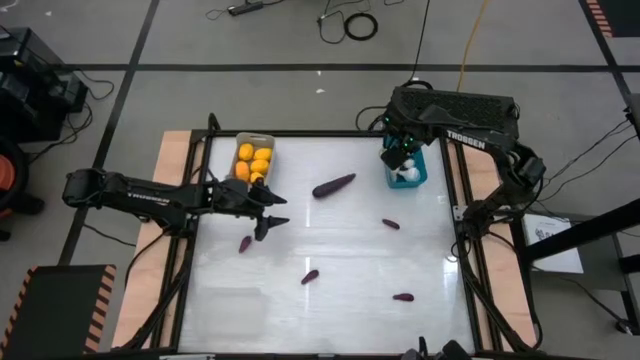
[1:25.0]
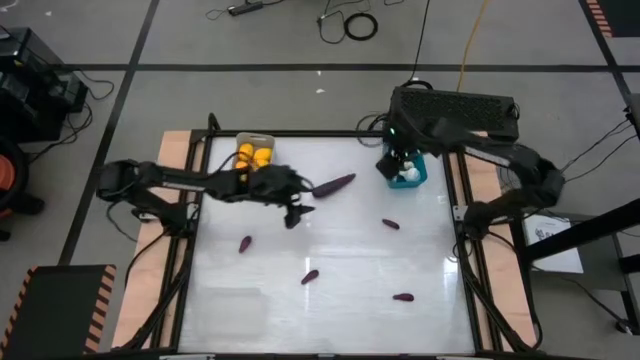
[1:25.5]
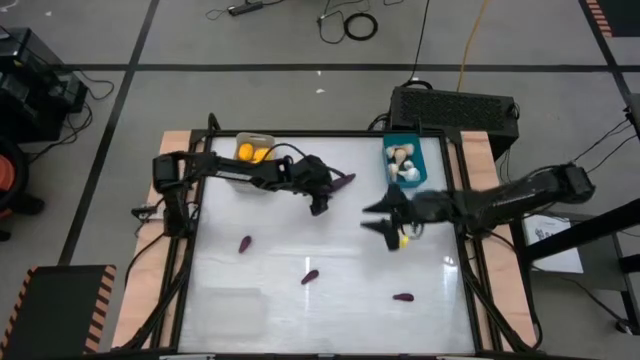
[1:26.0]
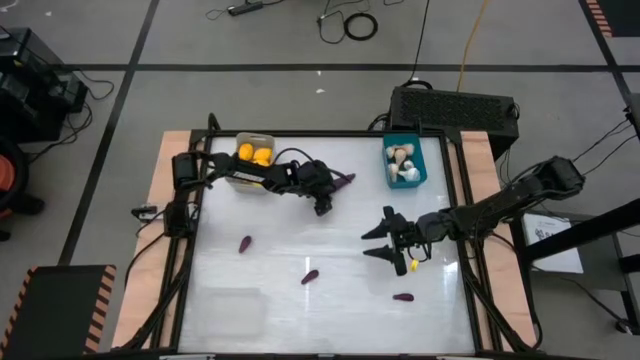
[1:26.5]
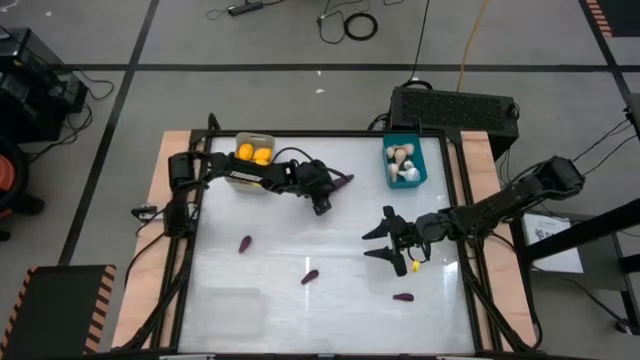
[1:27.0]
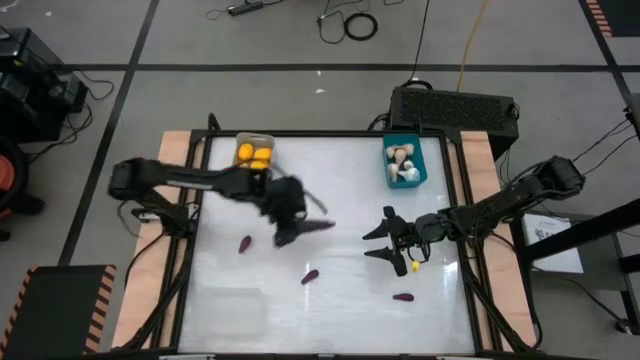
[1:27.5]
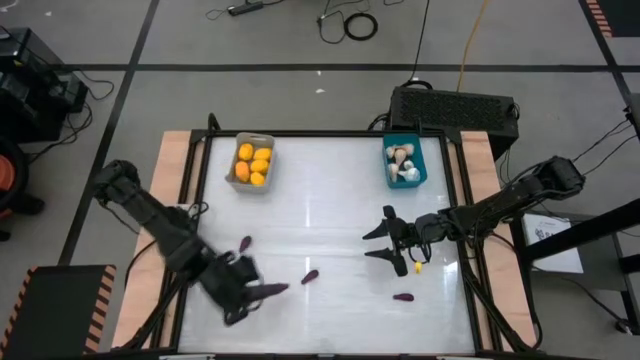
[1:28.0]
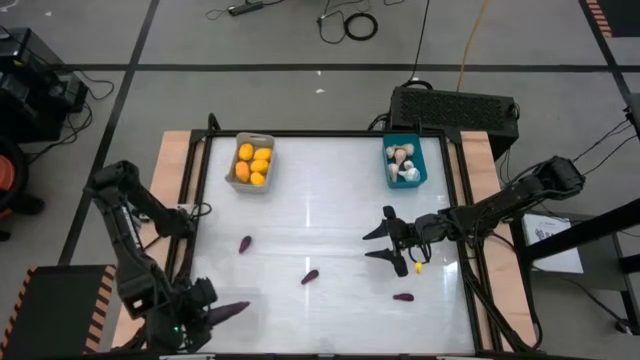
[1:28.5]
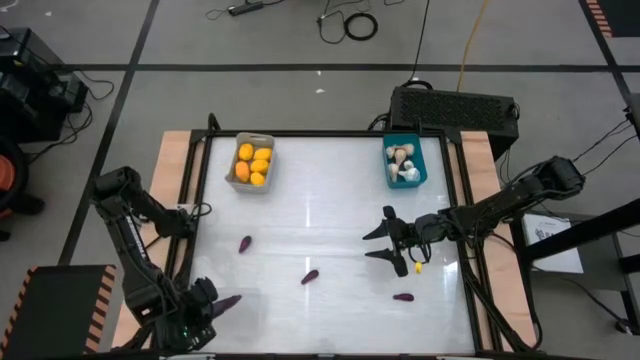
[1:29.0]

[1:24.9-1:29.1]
Task: Sort produce into baskets
Put the eggplant into the transparent bin

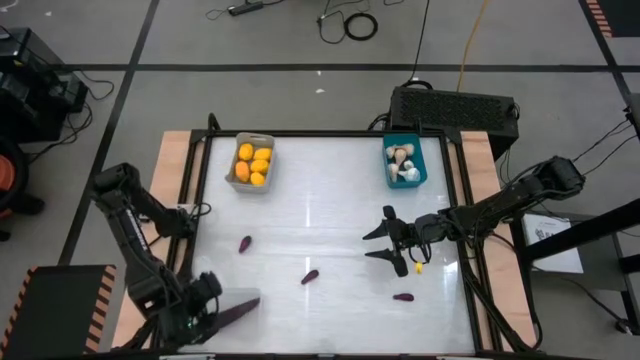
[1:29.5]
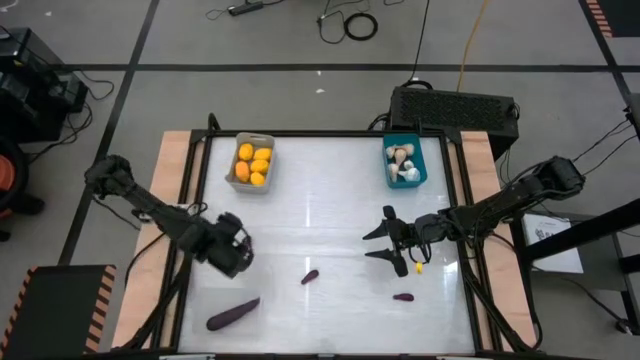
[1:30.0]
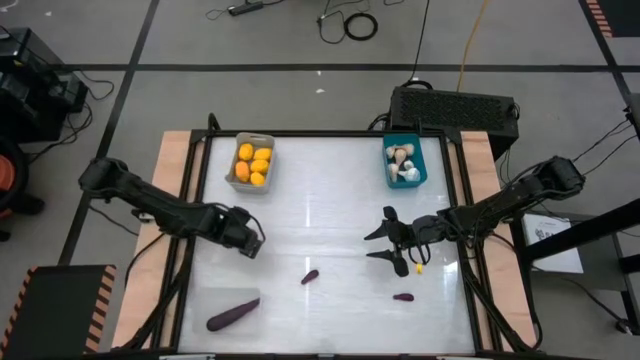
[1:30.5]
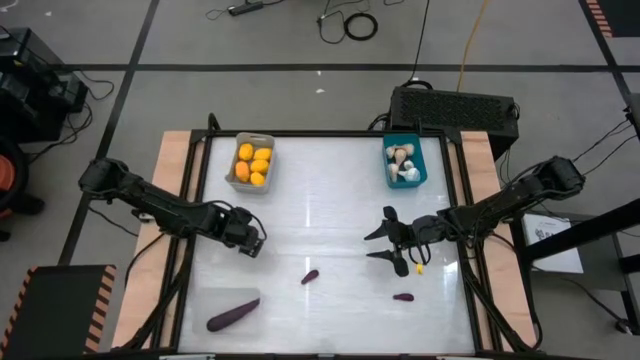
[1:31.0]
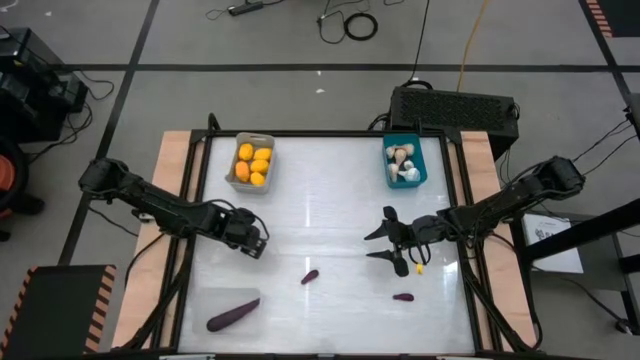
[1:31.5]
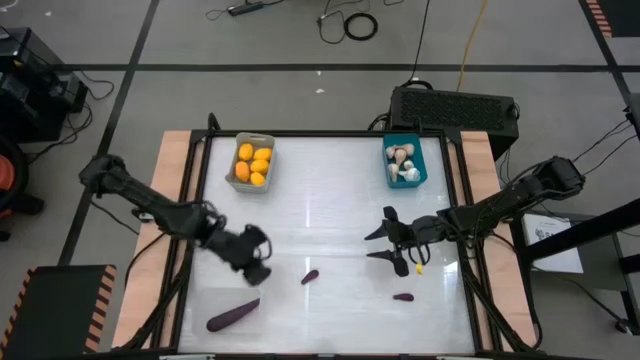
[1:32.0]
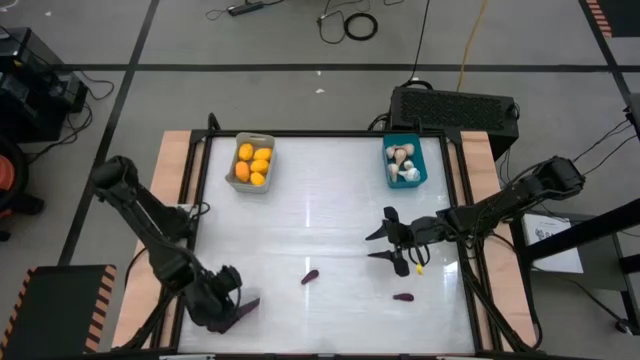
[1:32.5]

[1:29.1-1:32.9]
Put the eggplant into the transparent bin

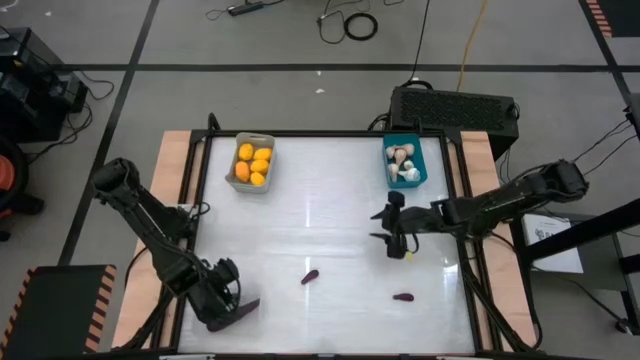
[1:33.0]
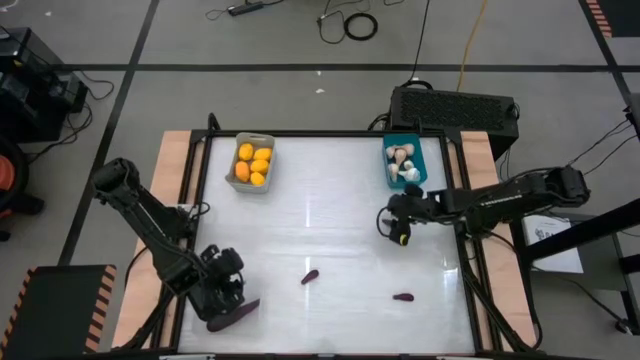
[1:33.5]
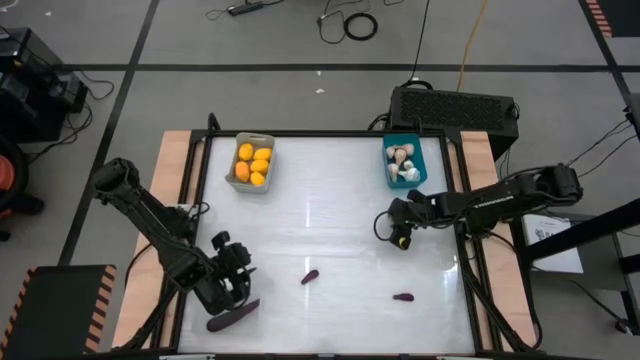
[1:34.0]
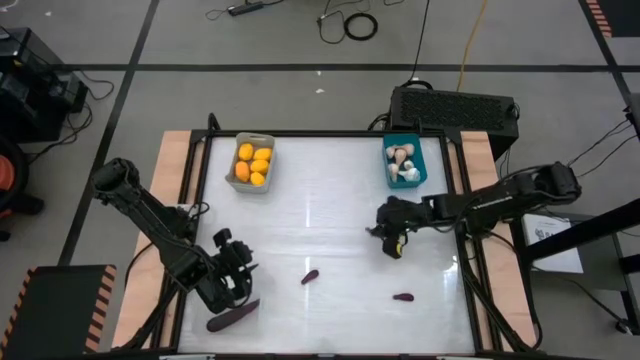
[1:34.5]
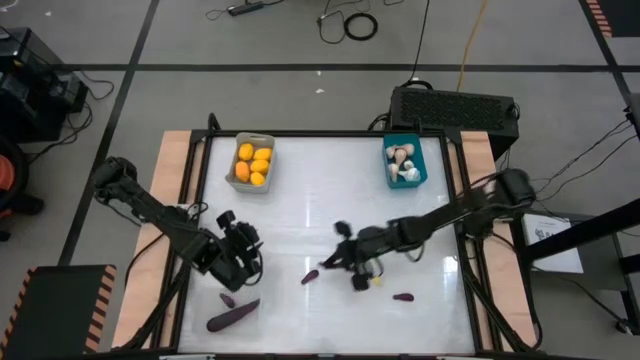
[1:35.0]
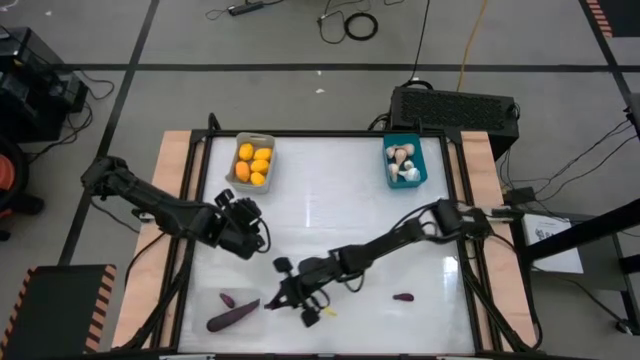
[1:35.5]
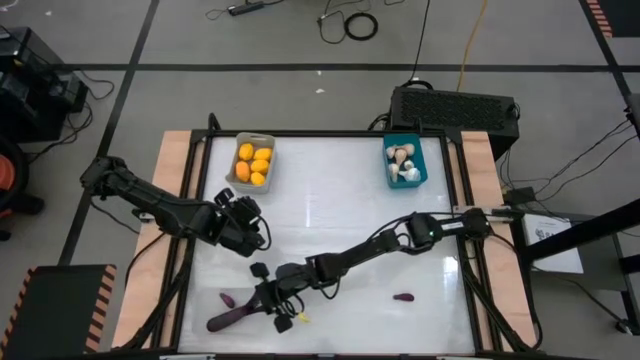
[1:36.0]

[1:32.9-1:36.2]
Put the eggplant into the transparent bin

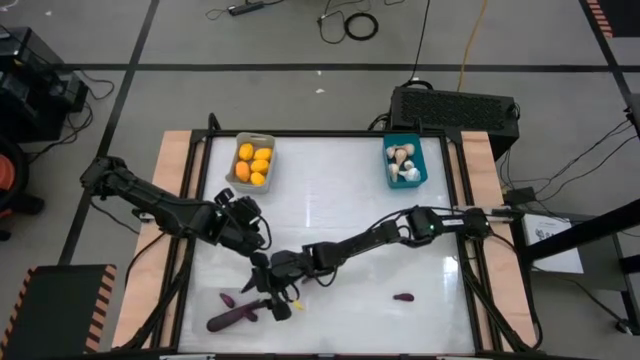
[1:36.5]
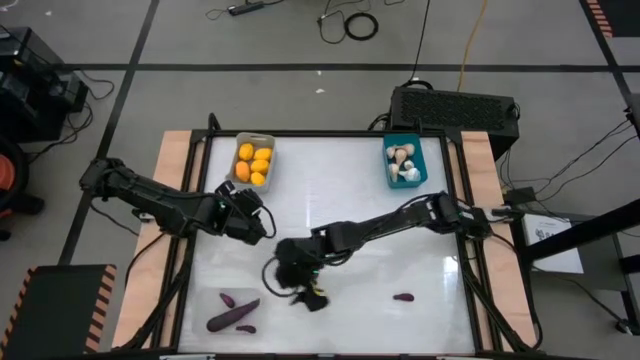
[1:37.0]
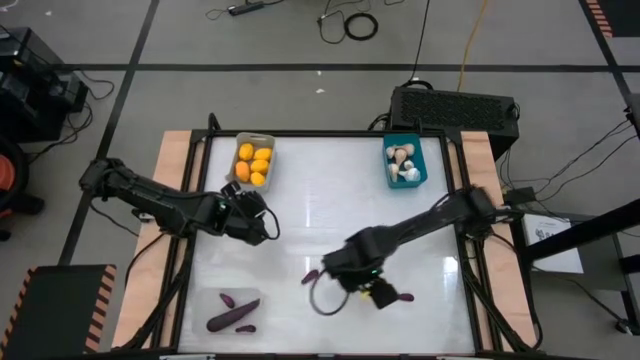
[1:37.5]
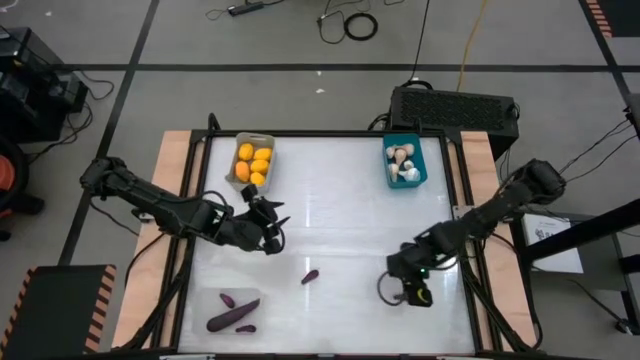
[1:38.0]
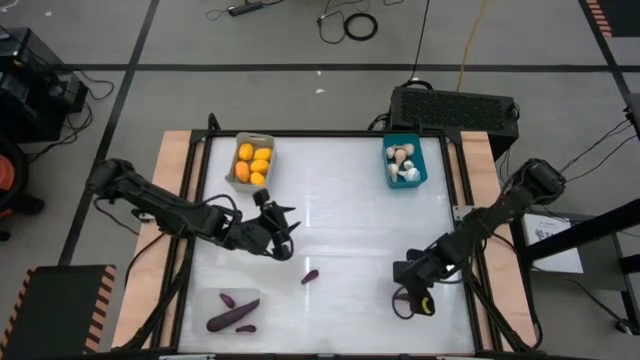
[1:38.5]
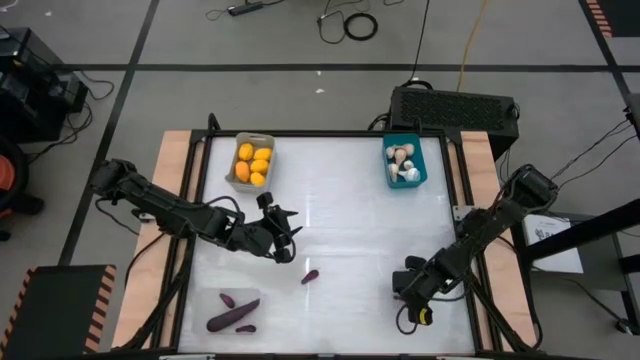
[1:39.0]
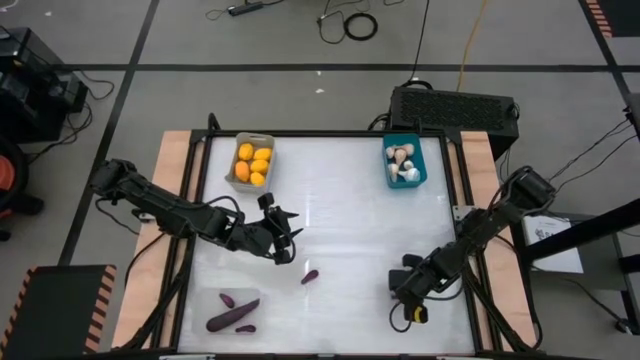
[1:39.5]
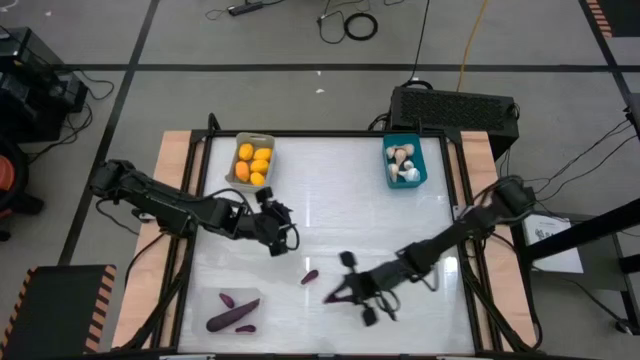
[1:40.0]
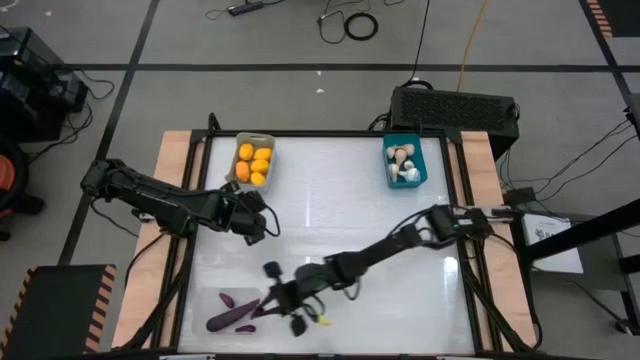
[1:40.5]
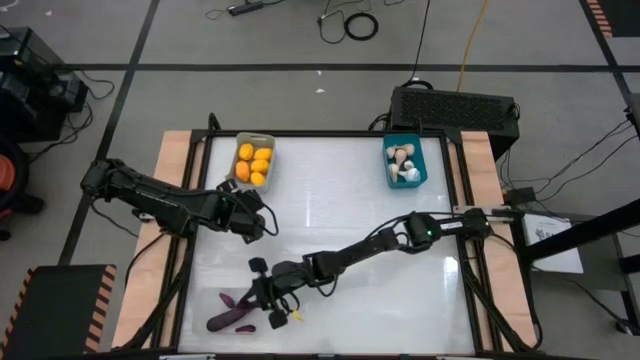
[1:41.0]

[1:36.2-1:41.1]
Put the eggplant into the transparent bin

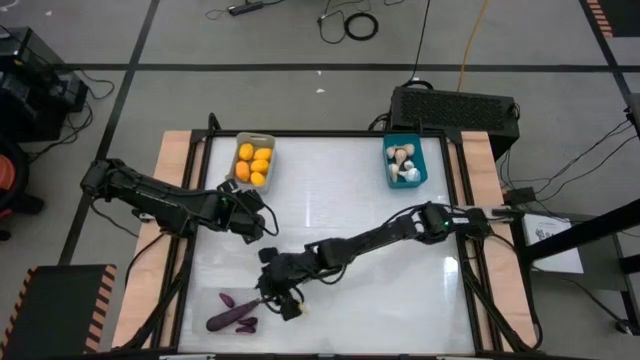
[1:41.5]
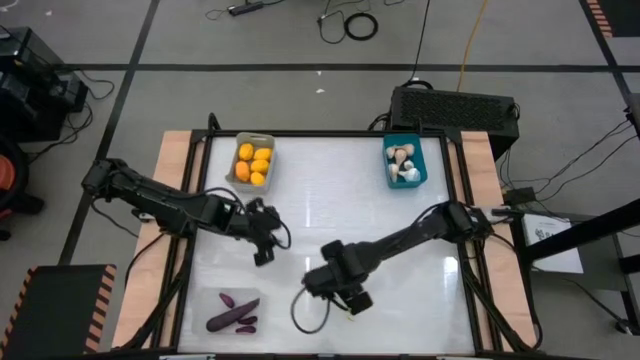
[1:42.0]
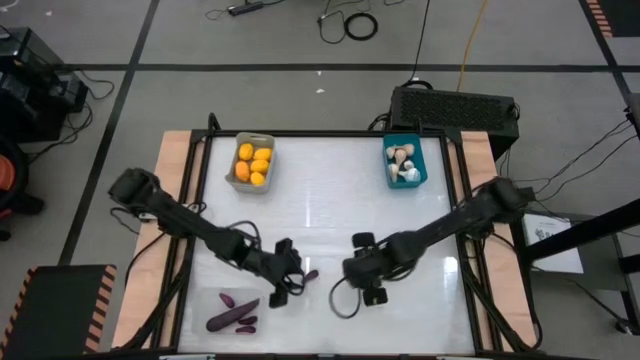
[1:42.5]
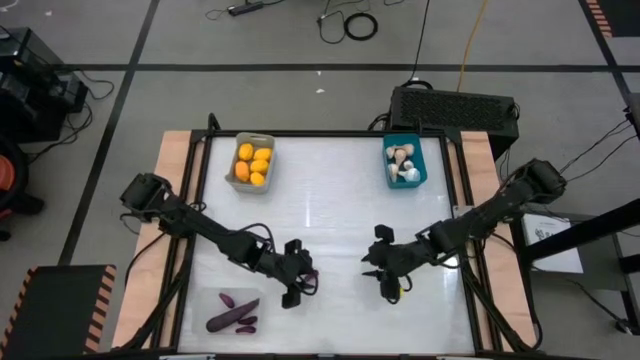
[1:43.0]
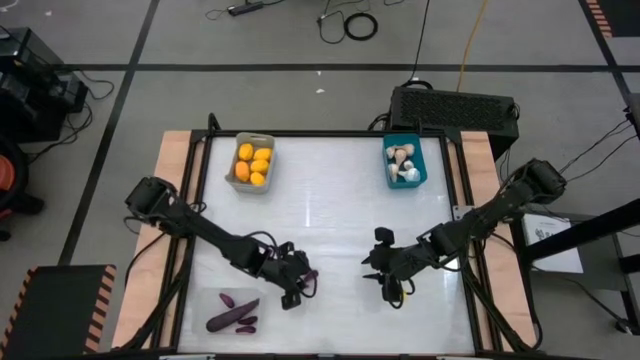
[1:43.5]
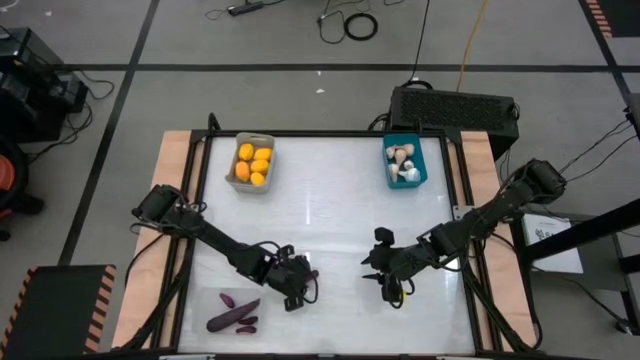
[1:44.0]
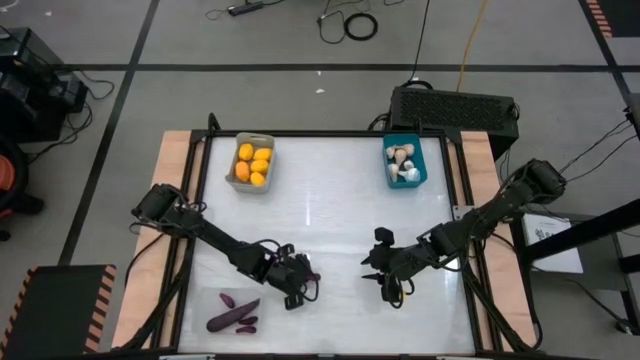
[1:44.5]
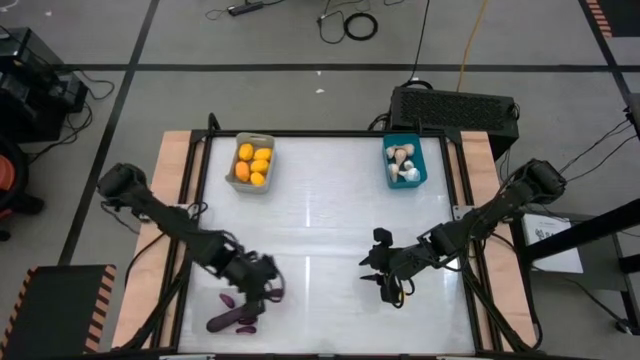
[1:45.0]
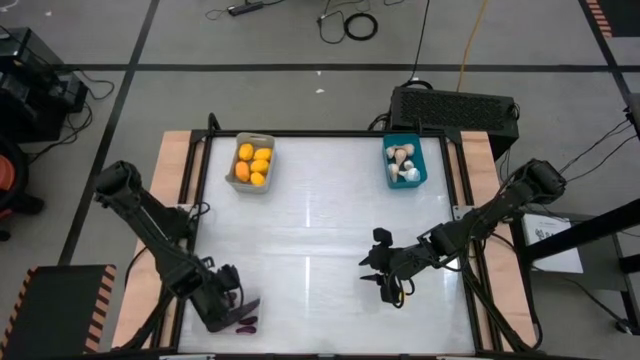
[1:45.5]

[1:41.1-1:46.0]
Put the eggplant into the transparent bin
